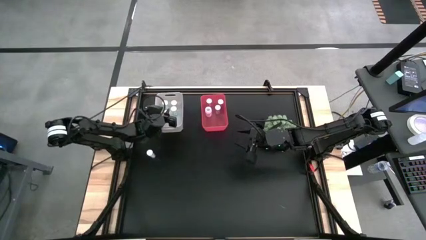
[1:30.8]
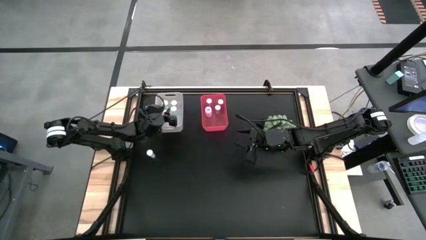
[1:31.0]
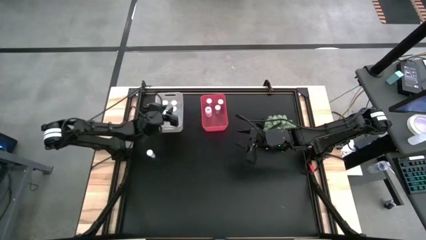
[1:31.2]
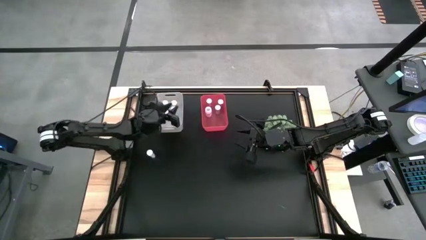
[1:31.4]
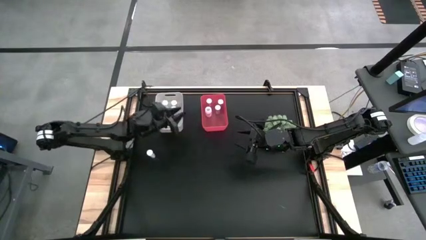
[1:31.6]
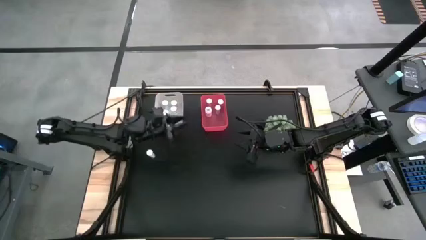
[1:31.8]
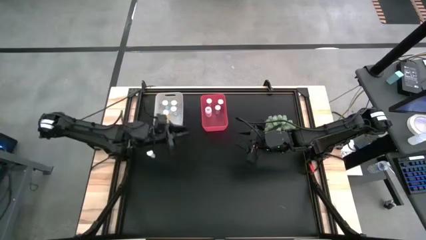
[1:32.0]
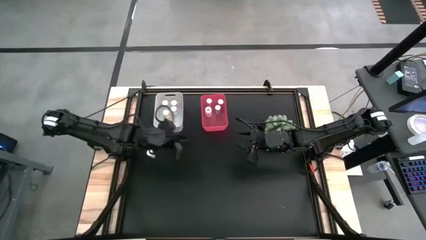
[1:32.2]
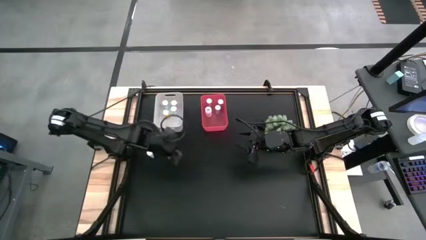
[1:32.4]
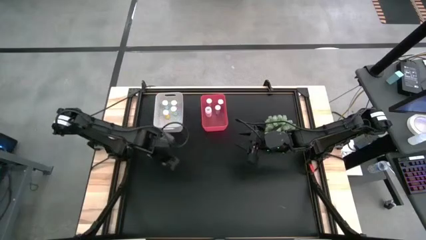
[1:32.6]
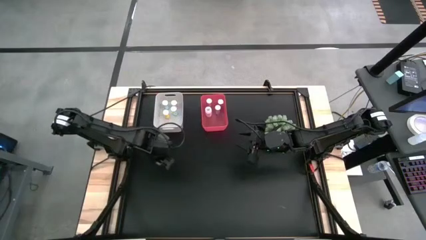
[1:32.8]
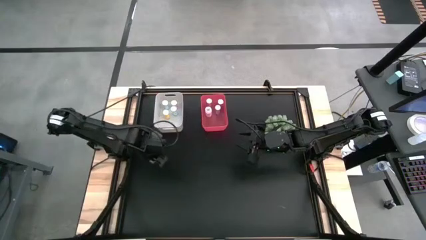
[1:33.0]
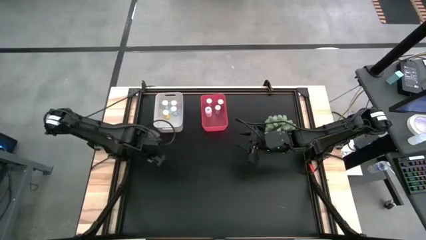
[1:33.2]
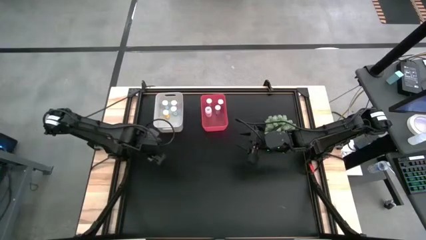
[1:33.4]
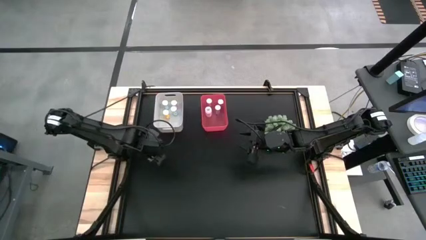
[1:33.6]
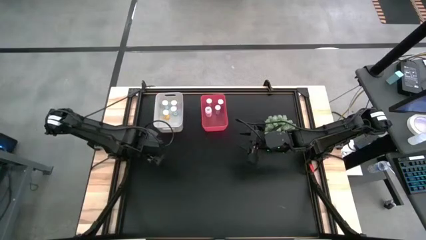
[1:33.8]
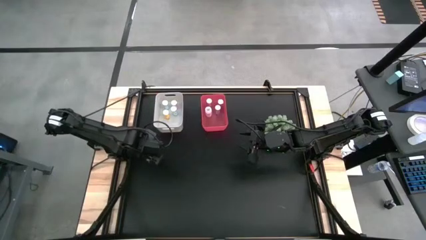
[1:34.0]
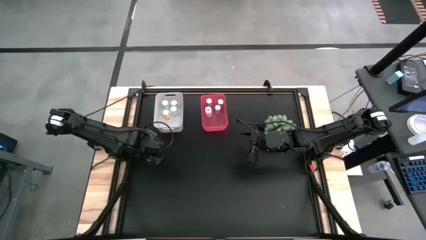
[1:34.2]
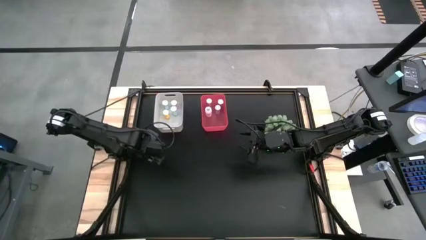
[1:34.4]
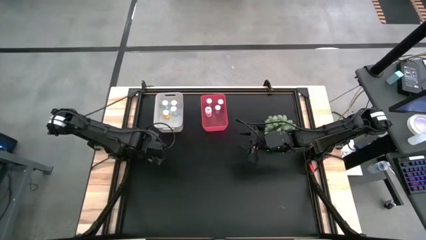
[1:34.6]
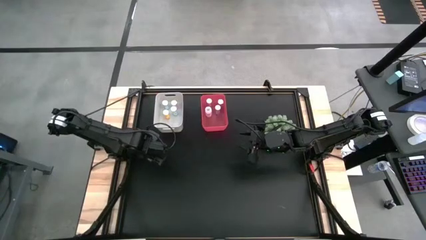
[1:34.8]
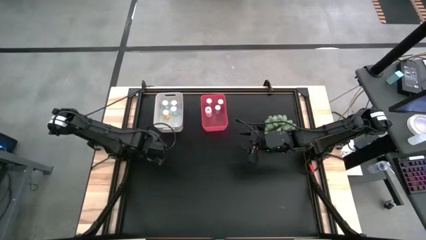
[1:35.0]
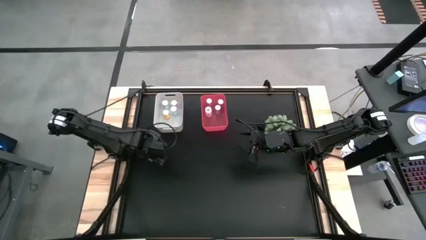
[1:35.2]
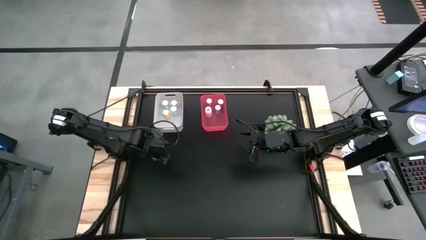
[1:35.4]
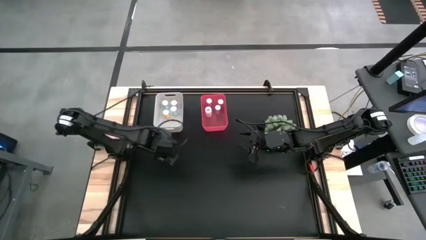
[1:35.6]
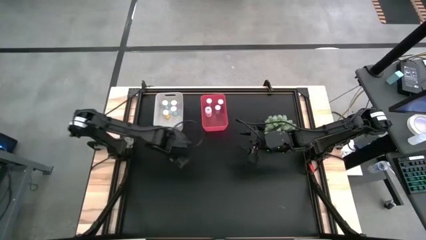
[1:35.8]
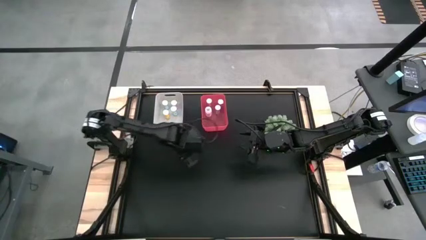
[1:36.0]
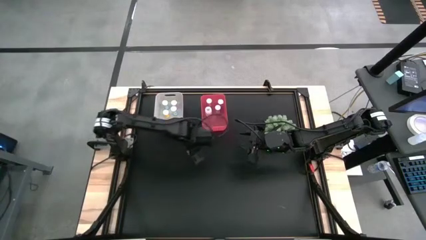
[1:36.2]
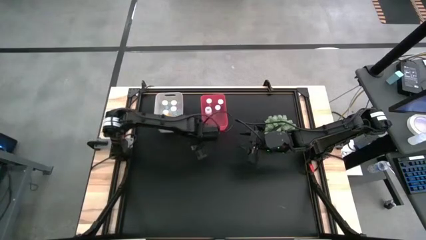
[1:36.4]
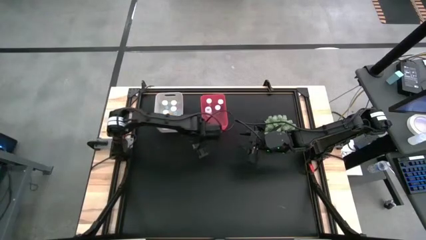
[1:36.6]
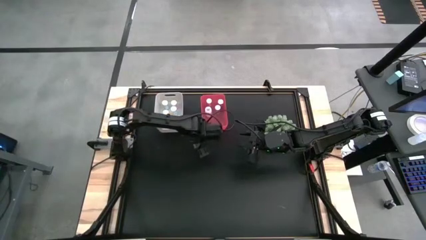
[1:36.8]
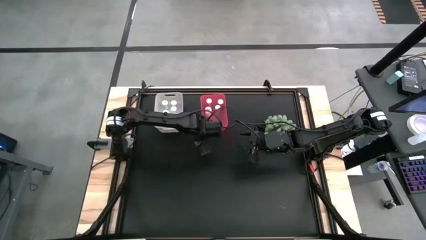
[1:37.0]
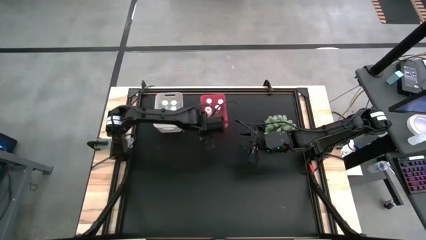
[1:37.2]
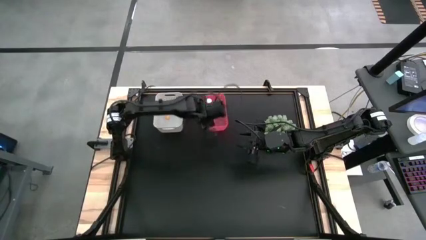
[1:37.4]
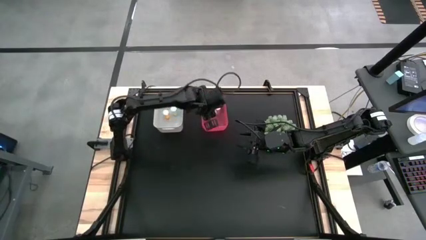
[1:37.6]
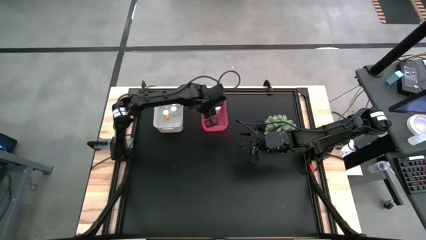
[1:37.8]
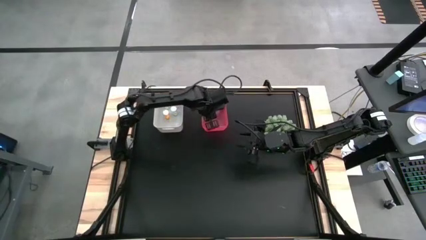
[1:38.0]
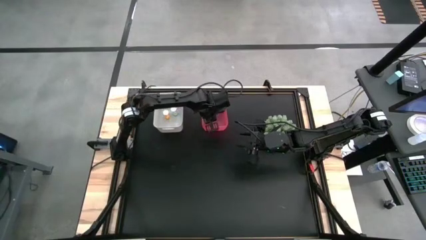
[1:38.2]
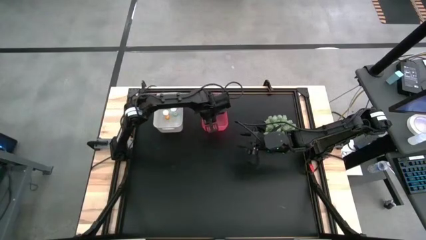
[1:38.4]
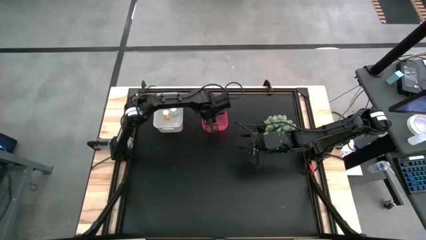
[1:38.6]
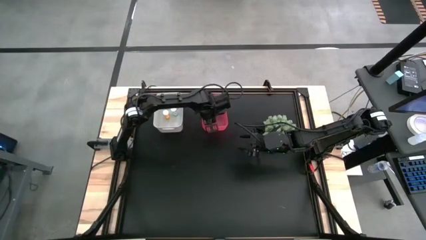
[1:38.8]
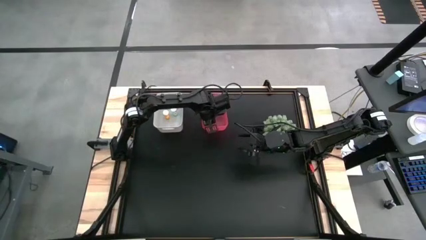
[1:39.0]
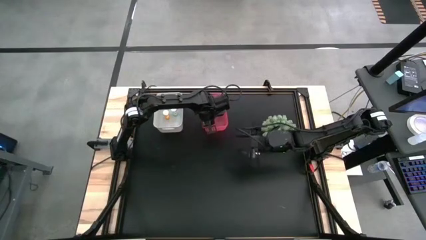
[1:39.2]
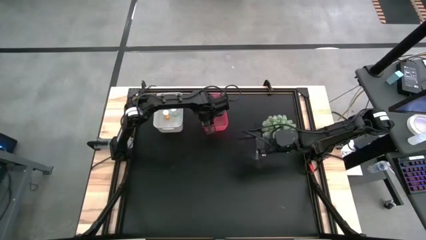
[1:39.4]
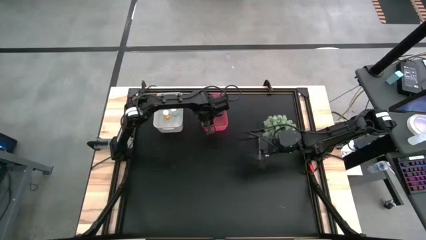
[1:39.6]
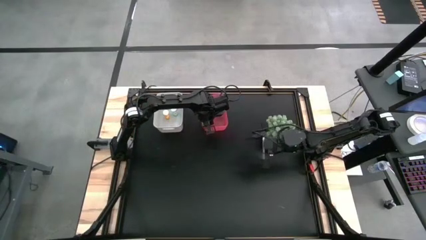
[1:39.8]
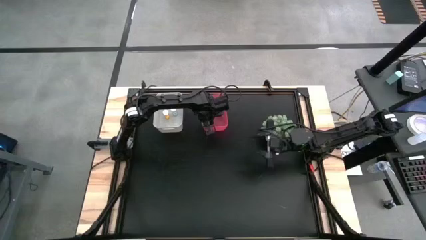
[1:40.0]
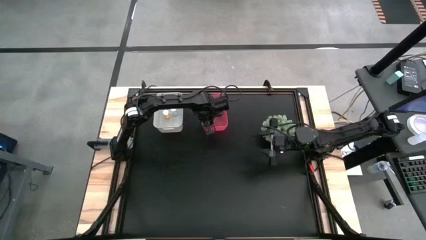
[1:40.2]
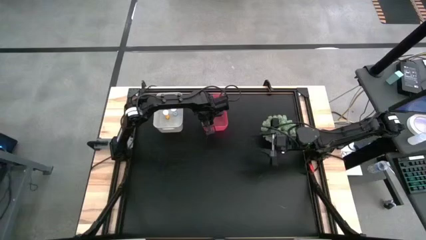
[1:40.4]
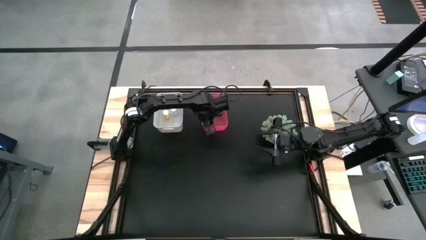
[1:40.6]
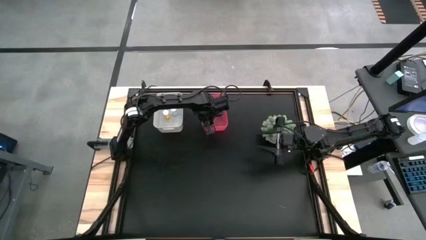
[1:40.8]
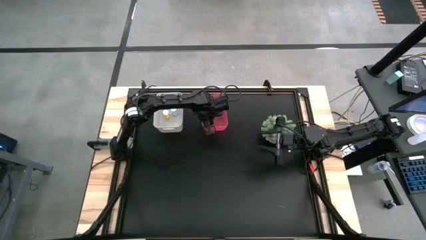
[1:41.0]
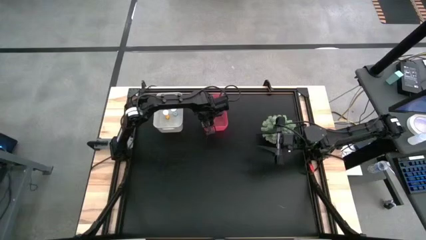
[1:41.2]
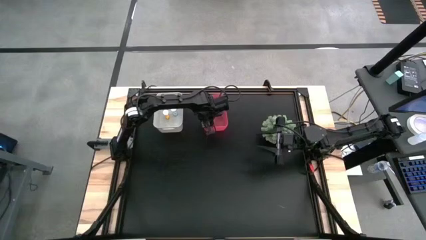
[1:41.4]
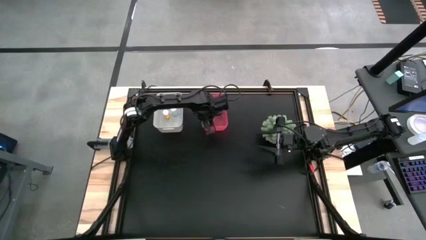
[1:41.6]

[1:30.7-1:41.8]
Task: Pick and place medicine bottles into bin by pill shape (circle, oval)
Put the blue capsule bottle into the pink bin
